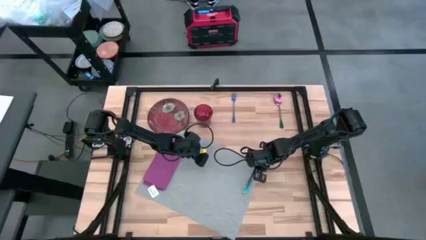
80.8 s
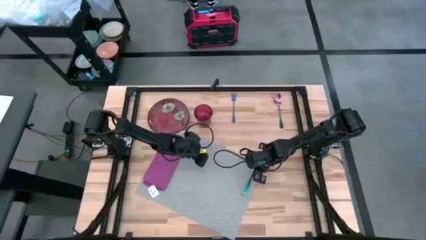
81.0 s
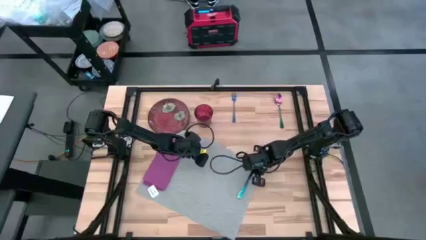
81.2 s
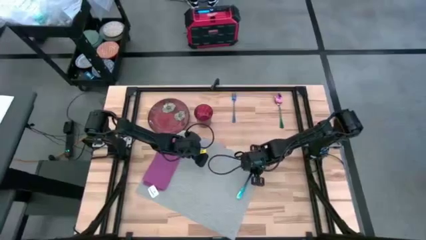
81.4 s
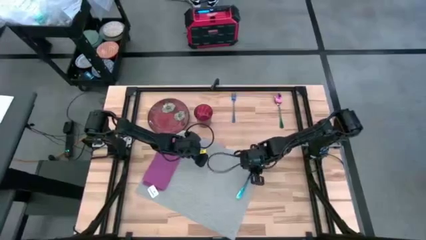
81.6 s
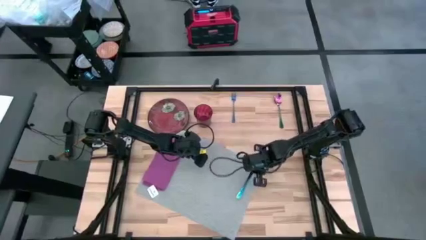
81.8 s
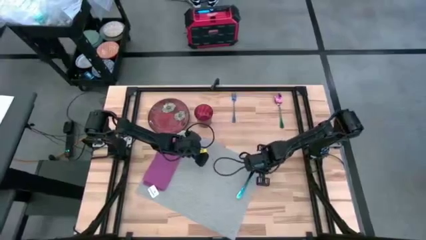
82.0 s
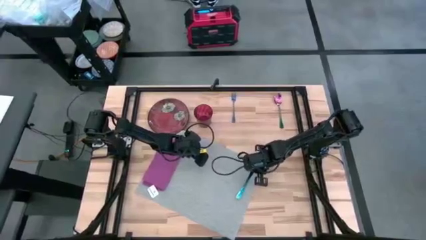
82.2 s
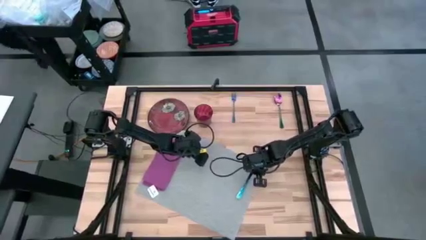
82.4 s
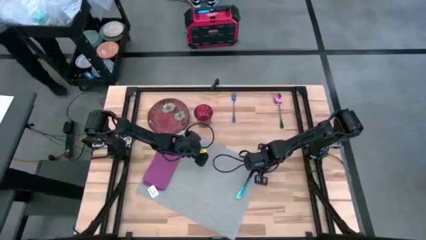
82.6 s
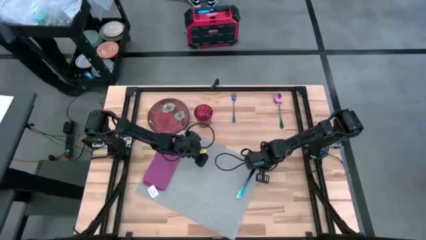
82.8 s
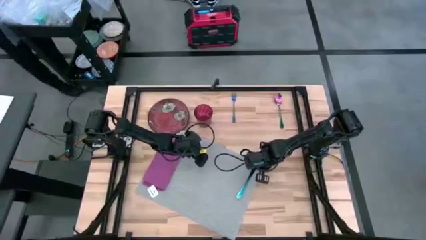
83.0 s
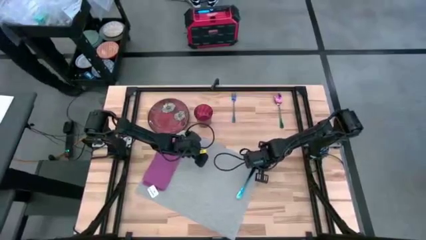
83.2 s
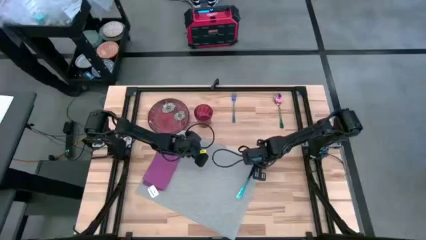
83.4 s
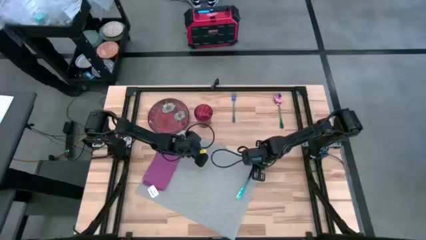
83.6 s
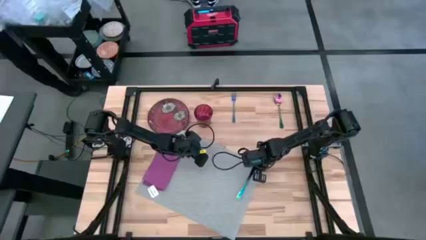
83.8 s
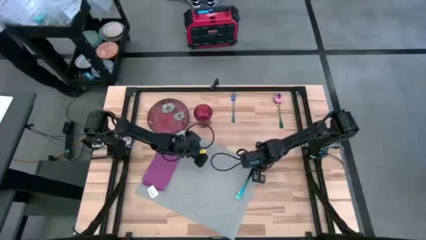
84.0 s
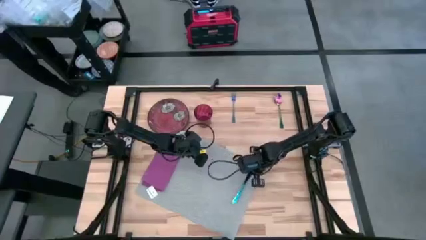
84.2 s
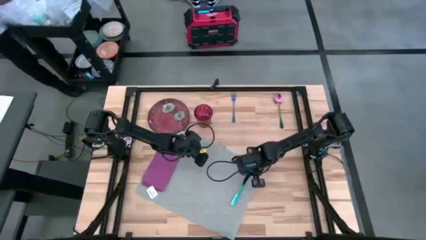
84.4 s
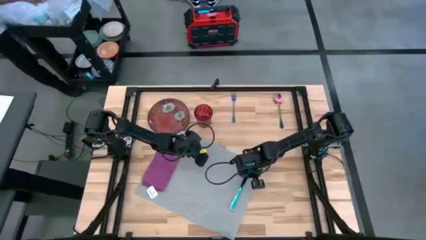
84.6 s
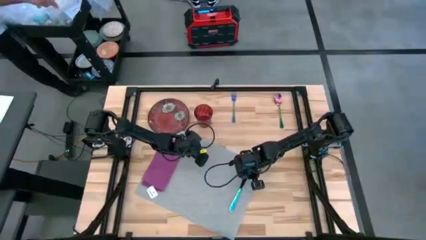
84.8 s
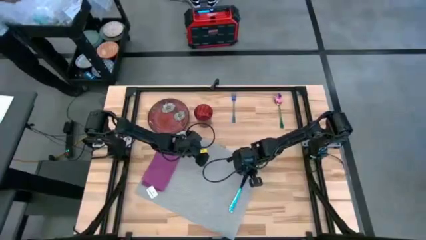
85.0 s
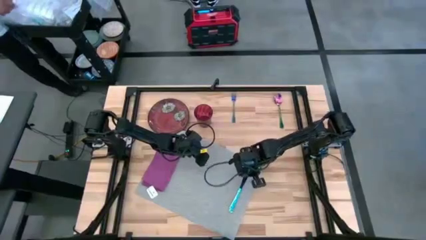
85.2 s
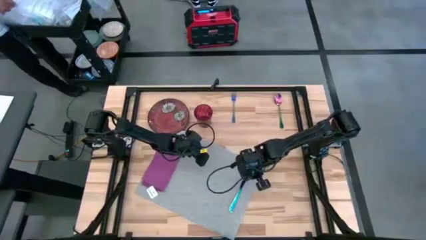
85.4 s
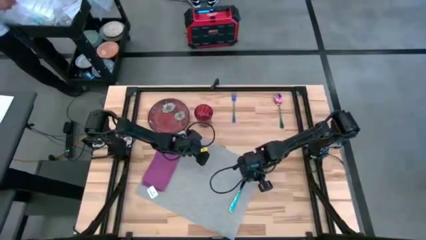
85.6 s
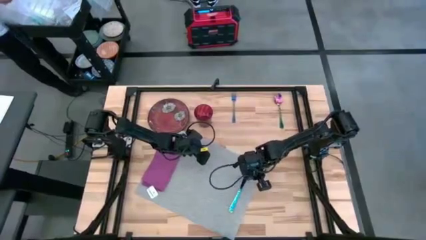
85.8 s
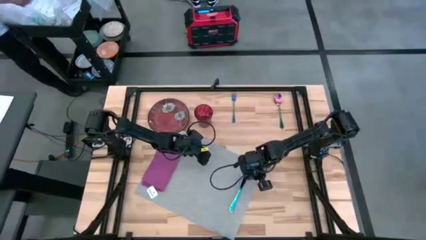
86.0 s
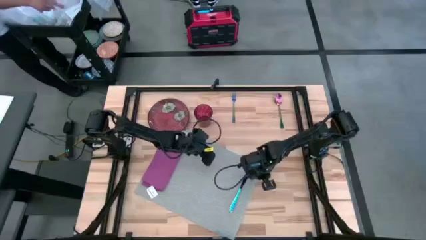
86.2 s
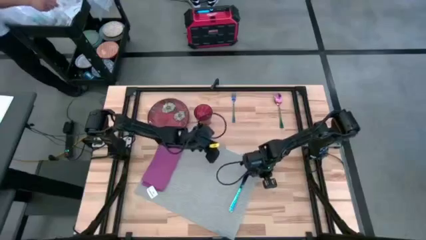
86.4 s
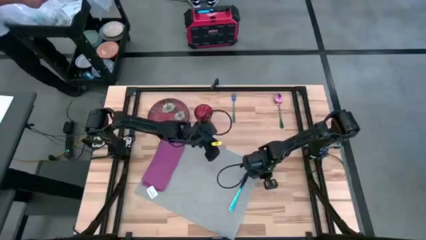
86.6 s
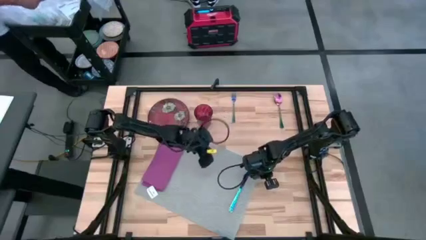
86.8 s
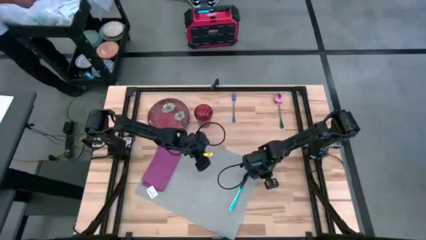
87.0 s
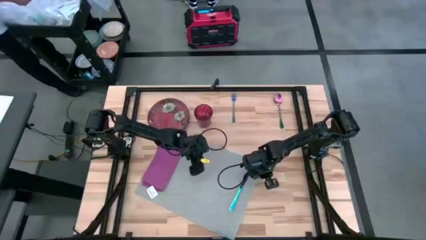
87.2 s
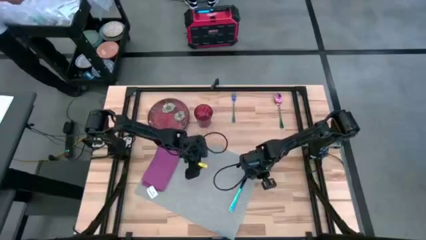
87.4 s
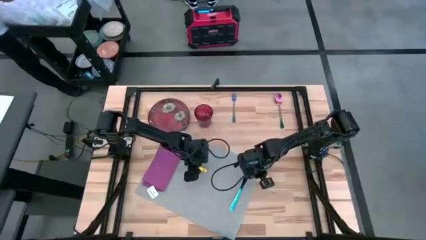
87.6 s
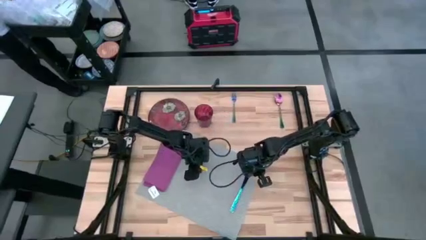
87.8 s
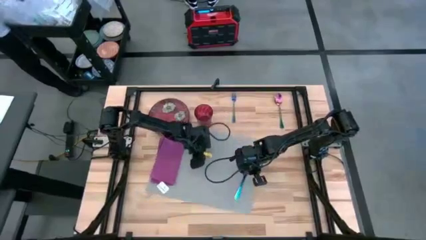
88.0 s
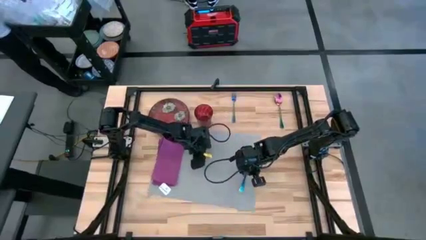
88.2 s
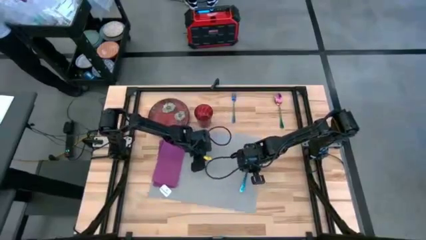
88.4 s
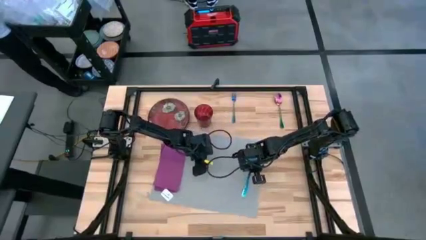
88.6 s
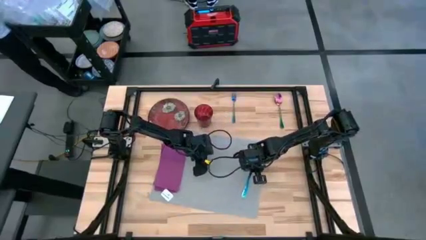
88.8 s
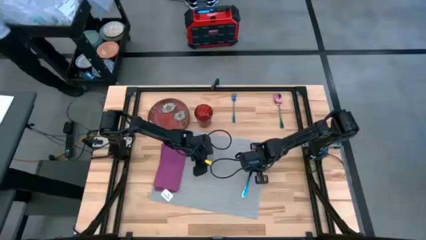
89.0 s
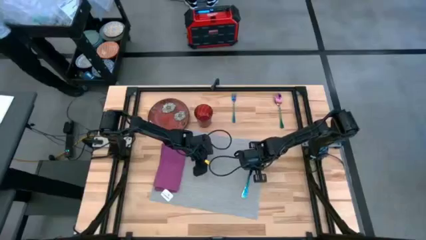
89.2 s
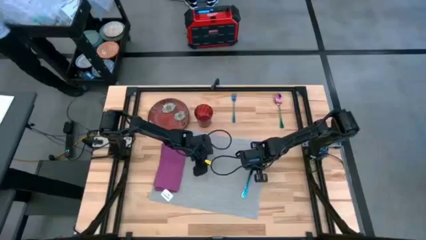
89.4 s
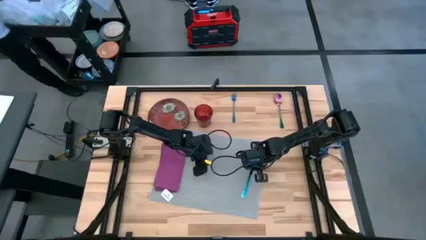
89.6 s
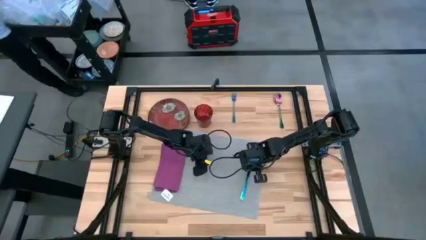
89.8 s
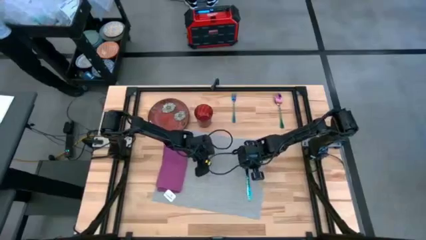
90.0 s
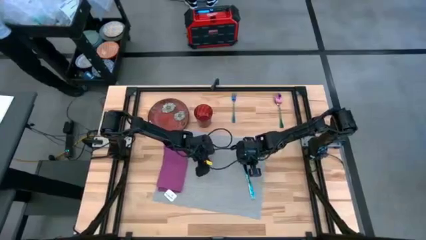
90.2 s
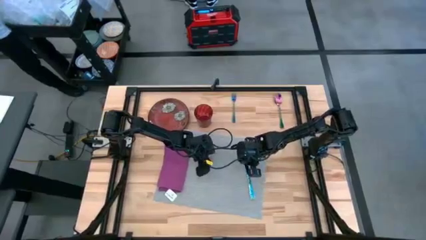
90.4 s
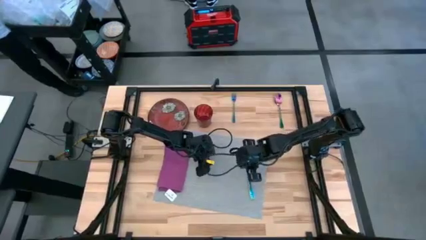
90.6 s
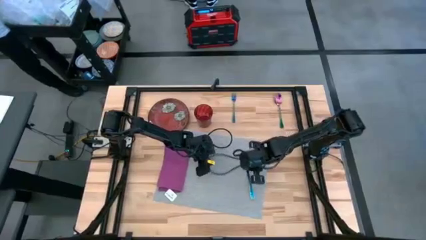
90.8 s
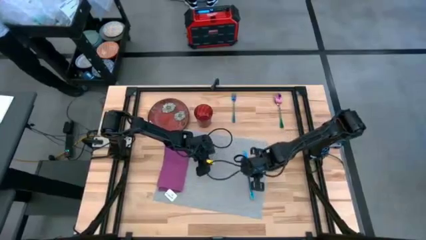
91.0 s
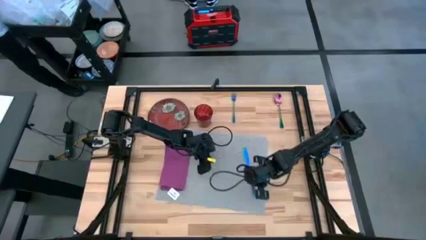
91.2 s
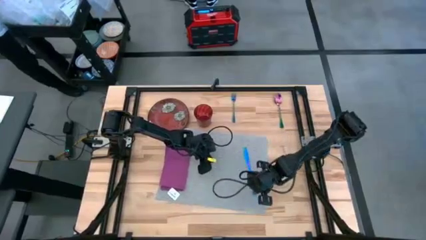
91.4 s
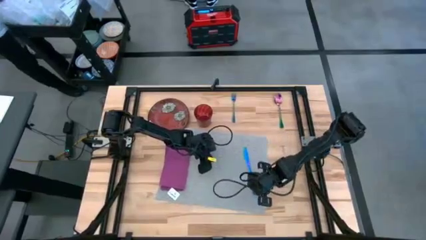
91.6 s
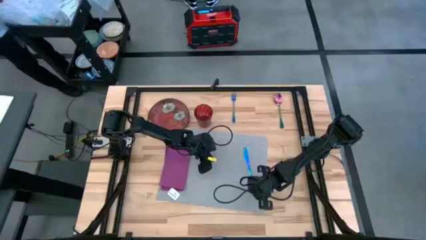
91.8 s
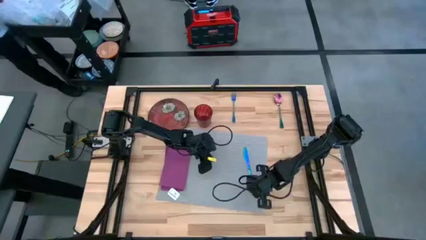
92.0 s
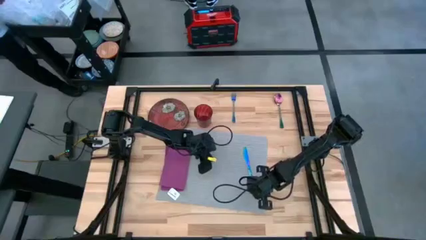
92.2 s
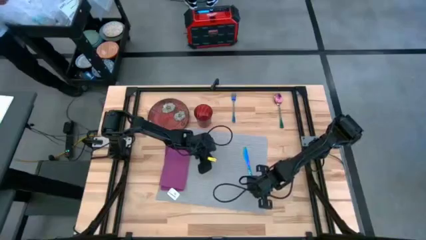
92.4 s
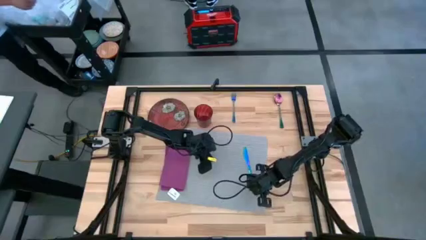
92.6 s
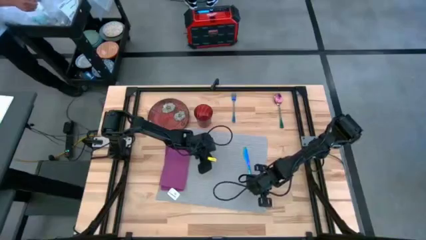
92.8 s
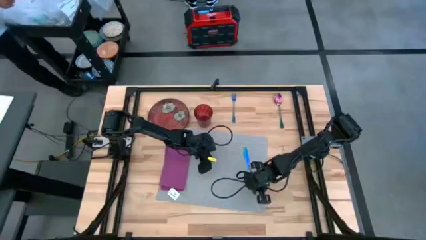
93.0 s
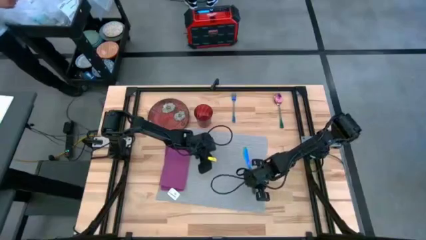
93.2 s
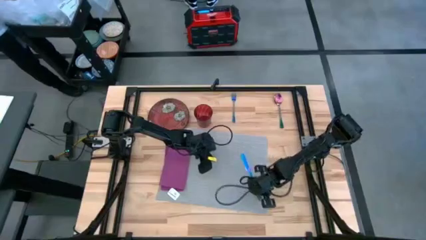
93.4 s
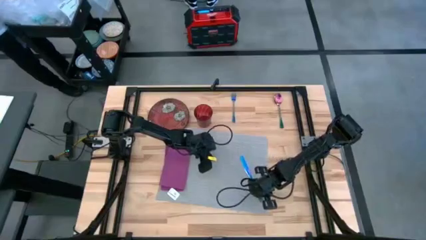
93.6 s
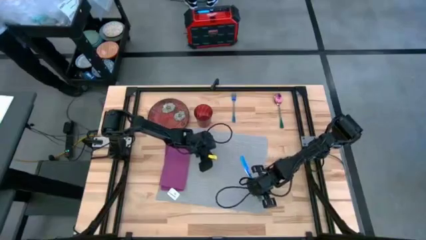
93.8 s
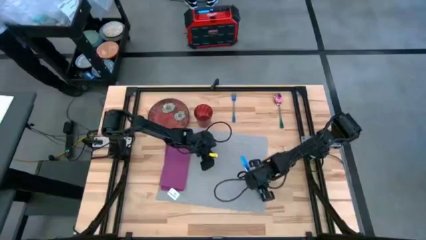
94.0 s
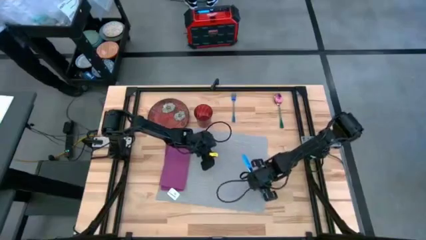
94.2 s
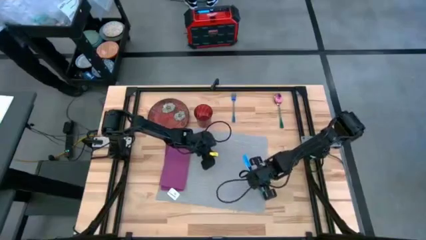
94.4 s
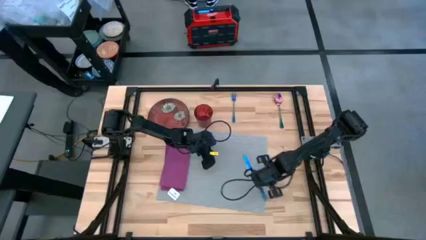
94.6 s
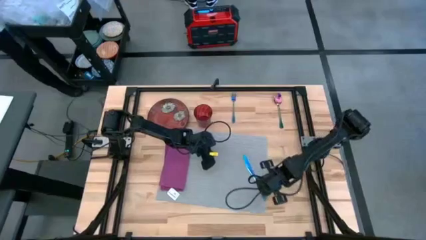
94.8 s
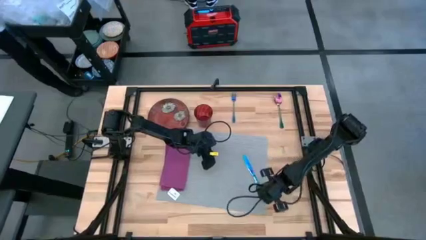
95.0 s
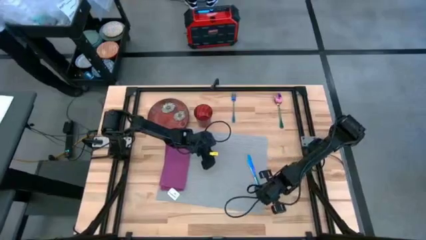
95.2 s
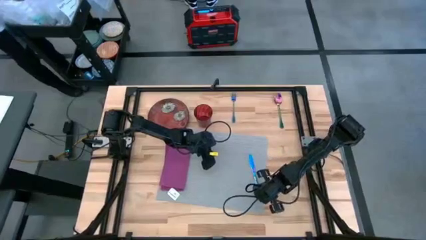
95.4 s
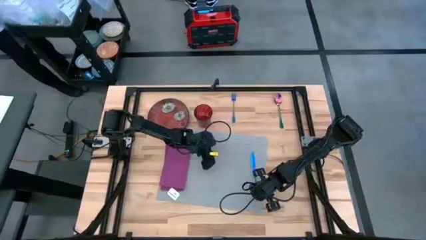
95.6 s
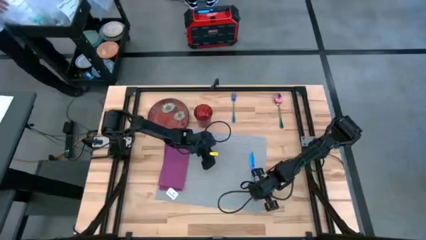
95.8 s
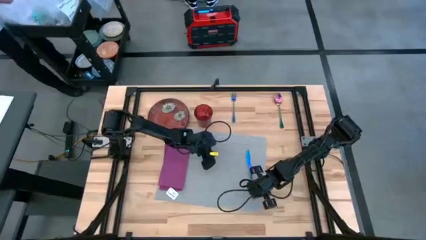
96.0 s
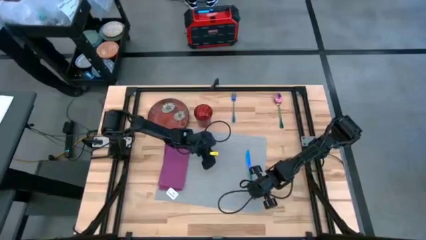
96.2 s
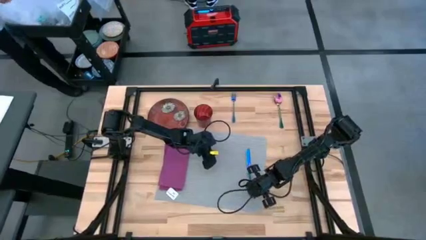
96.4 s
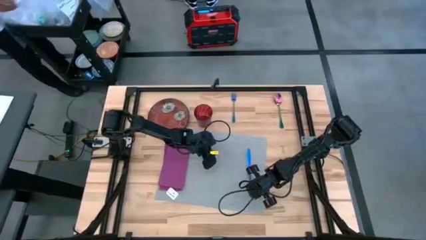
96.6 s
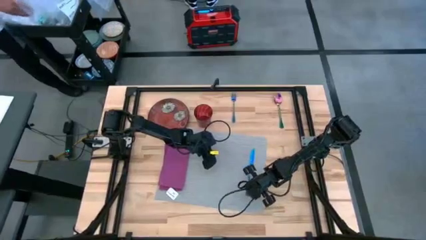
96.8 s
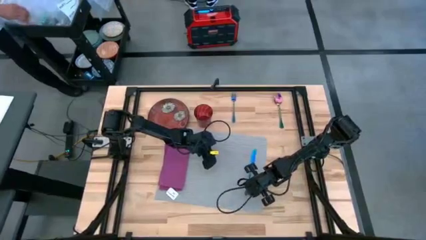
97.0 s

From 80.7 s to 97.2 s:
Task: Set table place
Put the blue knife on the middle right of the gray place mat
